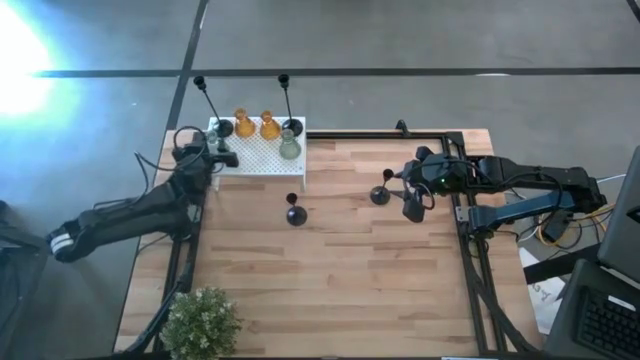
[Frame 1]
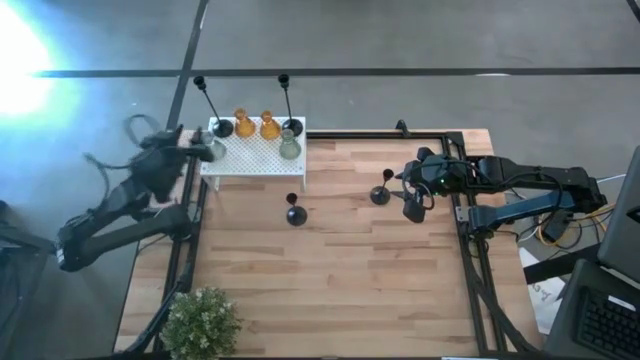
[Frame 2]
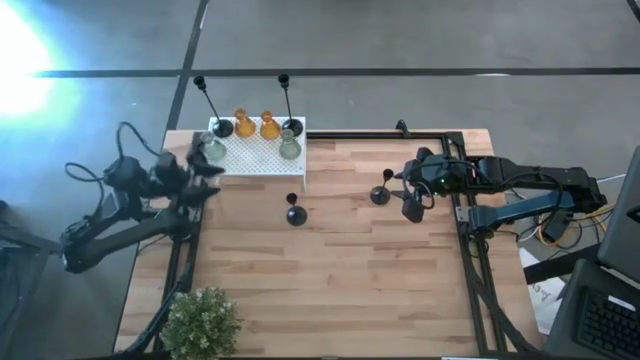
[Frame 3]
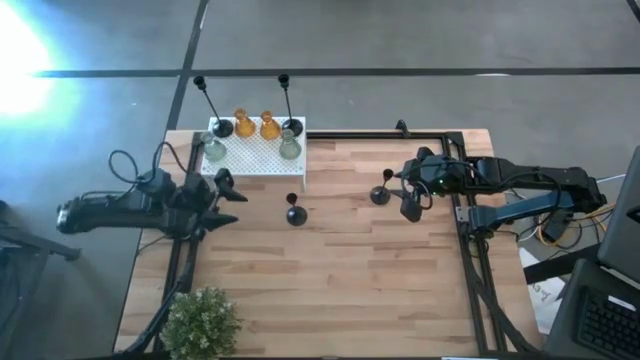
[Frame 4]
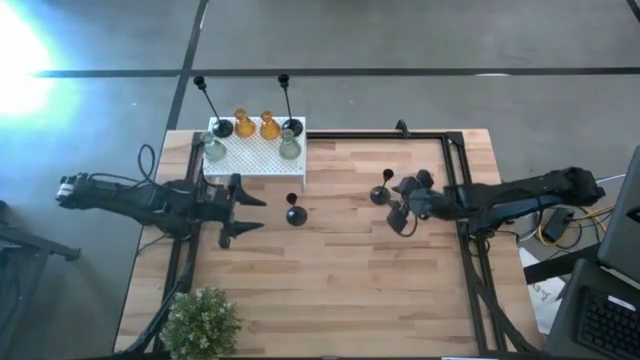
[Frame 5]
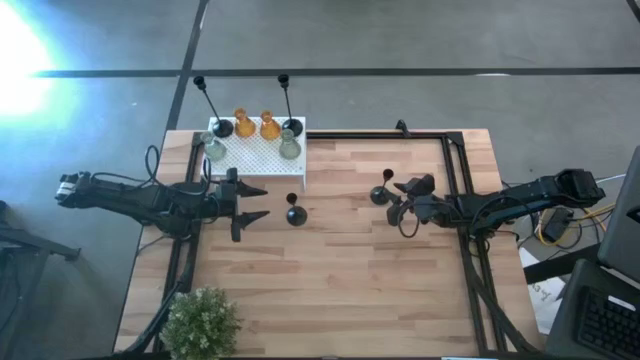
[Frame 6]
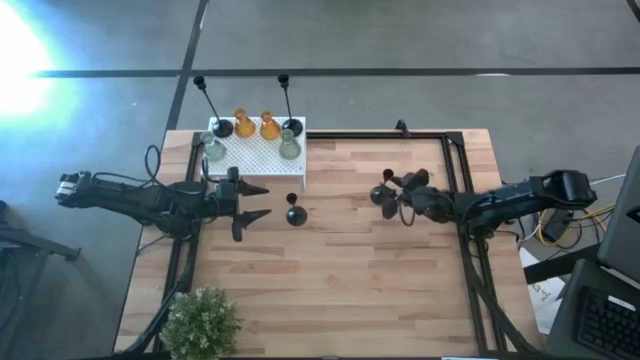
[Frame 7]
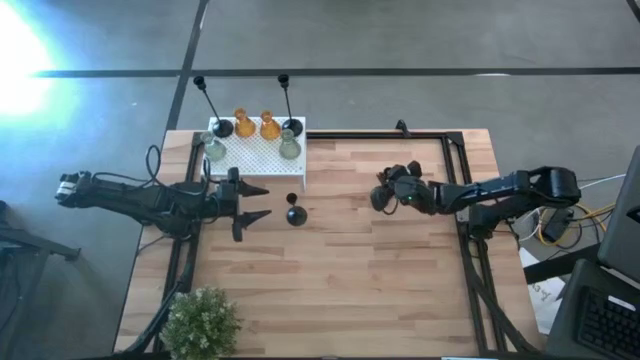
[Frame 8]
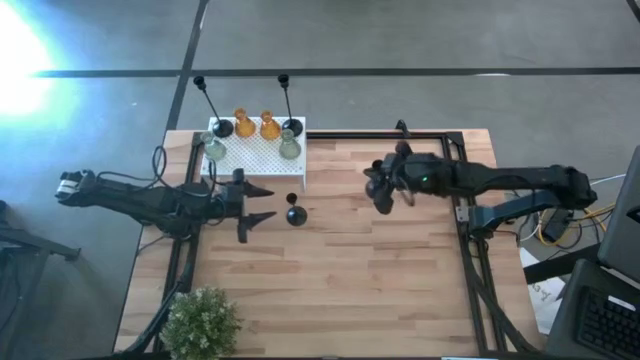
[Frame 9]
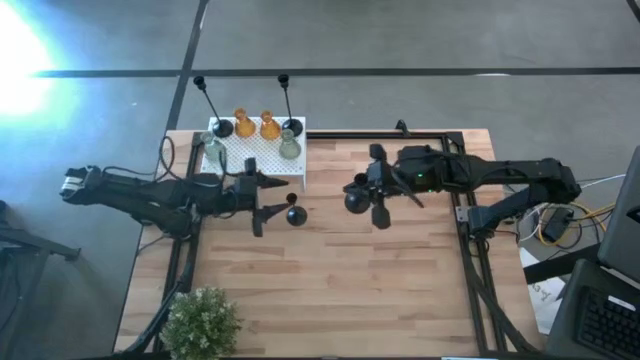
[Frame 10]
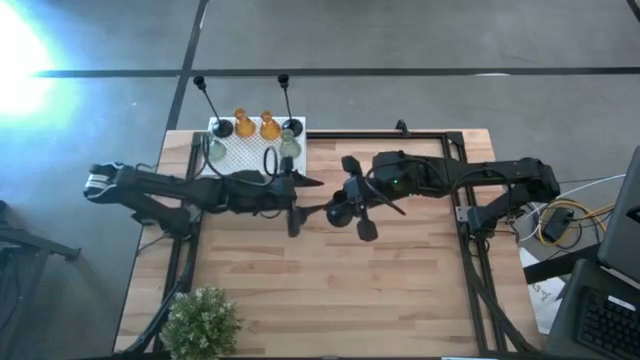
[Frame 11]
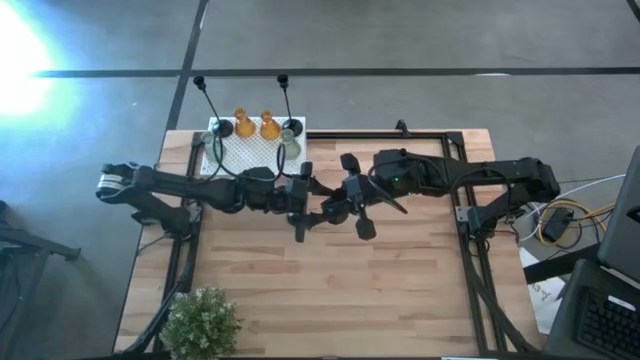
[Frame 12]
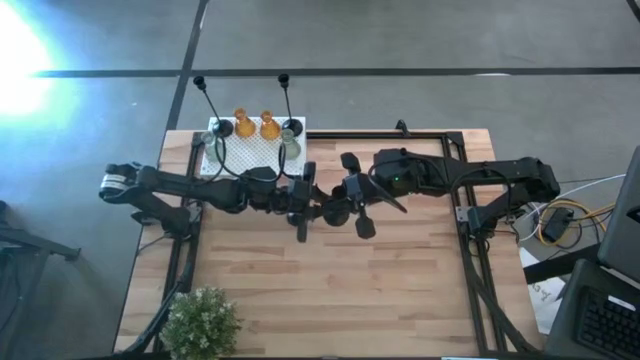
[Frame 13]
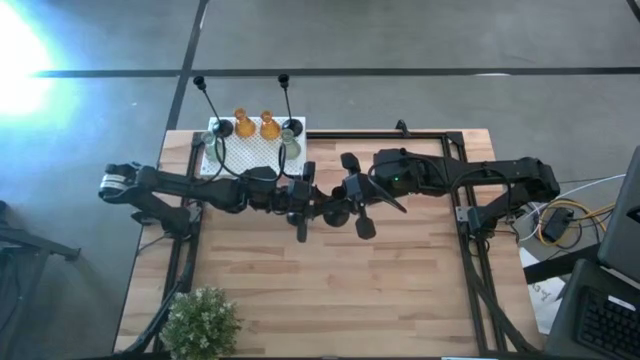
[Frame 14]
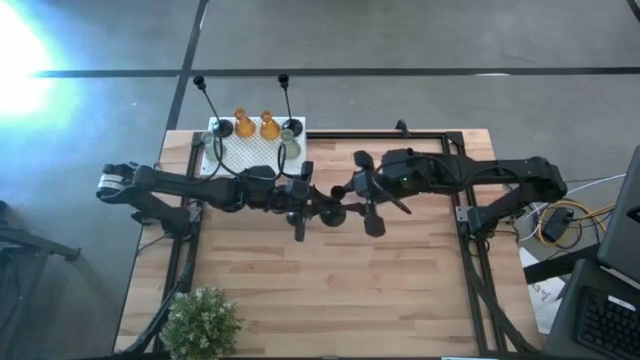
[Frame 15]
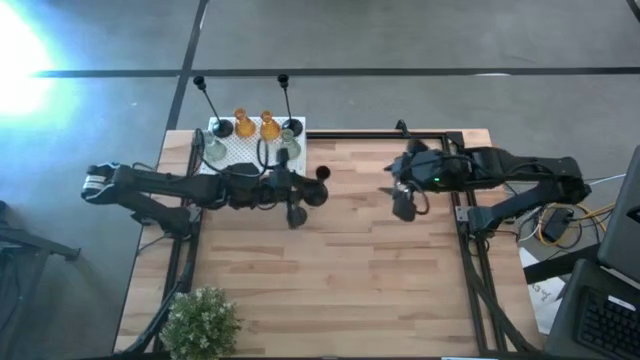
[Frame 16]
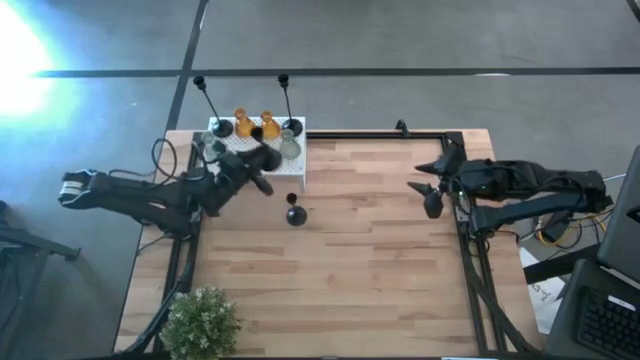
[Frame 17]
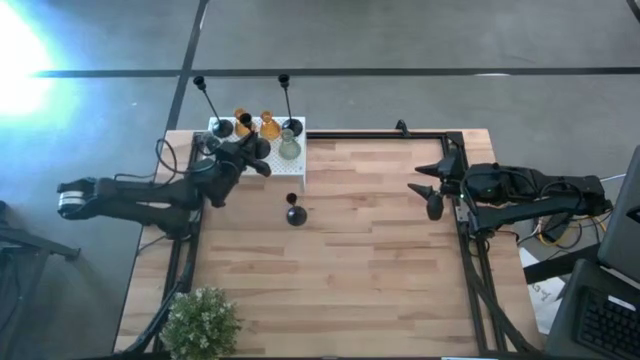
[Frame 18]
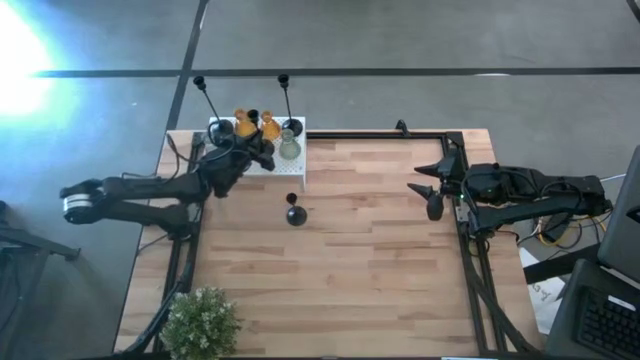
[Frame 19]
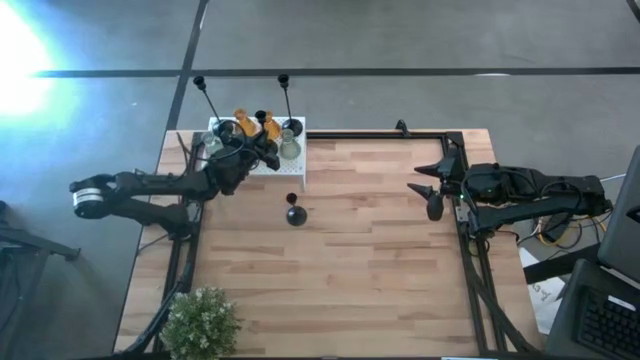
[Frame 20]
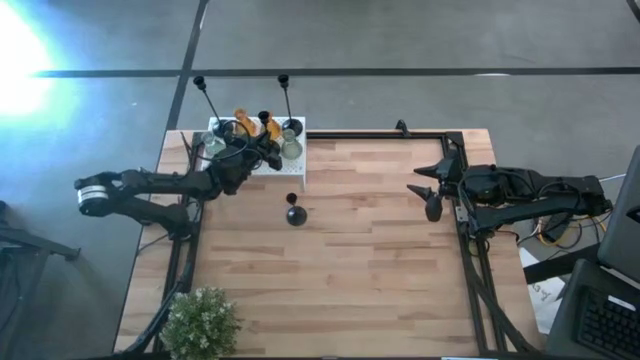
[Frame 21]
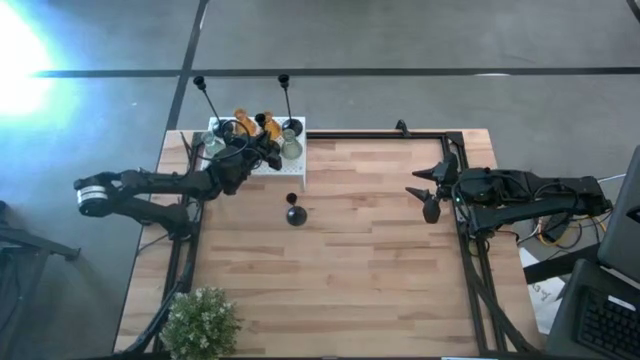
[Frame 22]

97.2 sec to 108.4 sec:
Task: Pick & Place candle stick holders
Put the right small black candle holder on the shelf

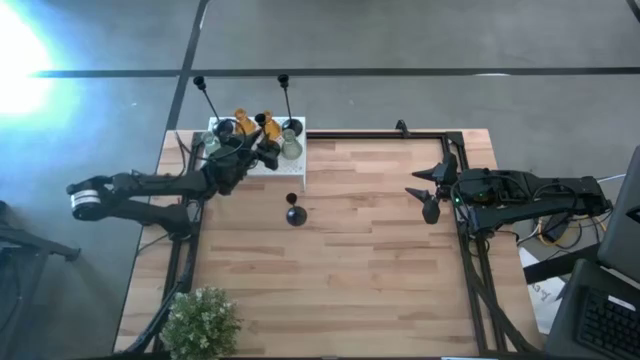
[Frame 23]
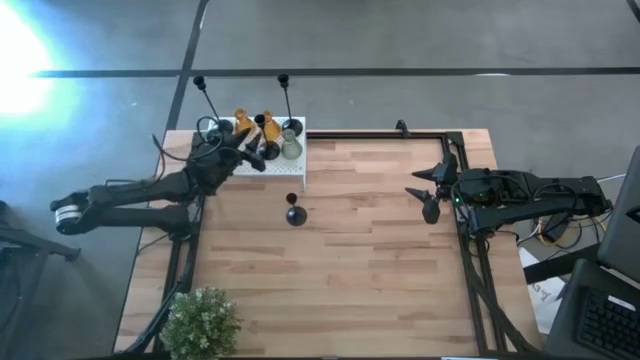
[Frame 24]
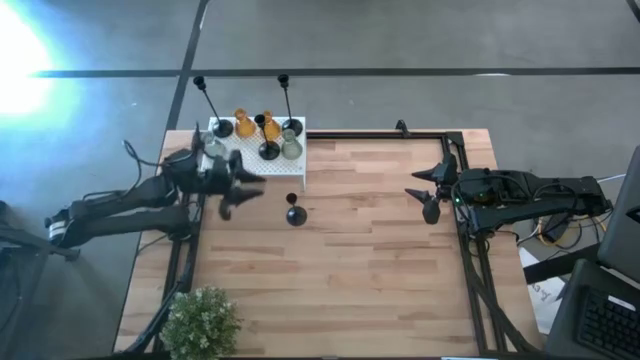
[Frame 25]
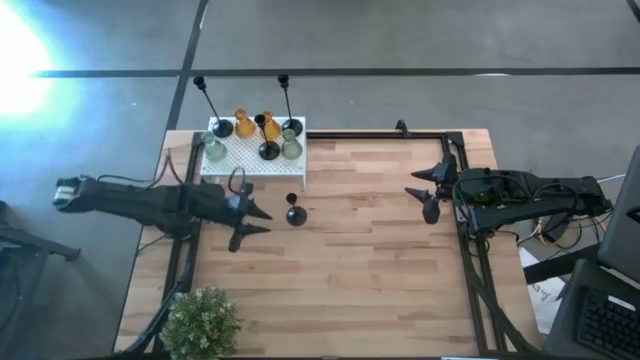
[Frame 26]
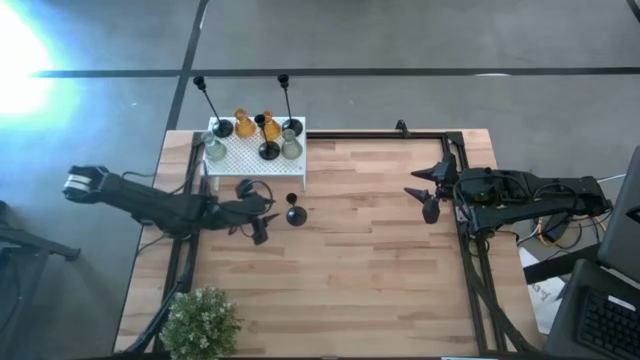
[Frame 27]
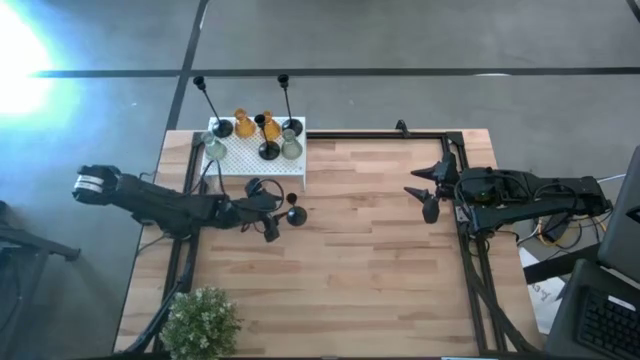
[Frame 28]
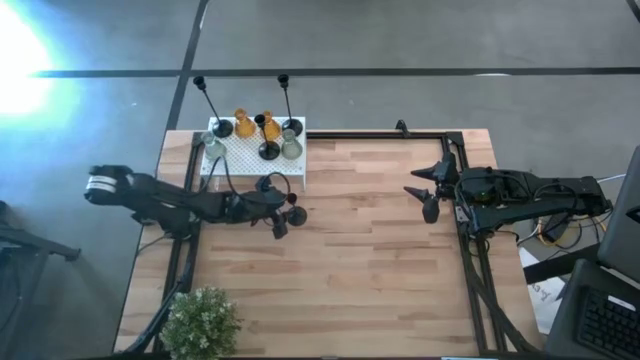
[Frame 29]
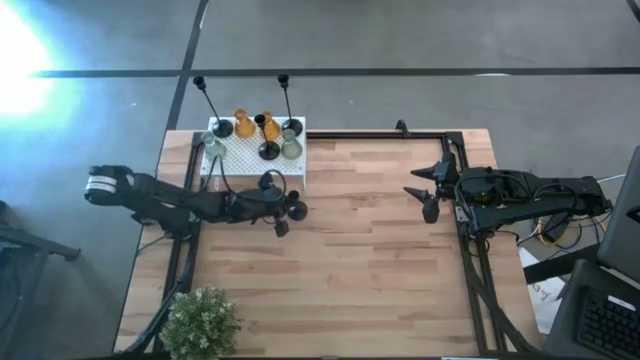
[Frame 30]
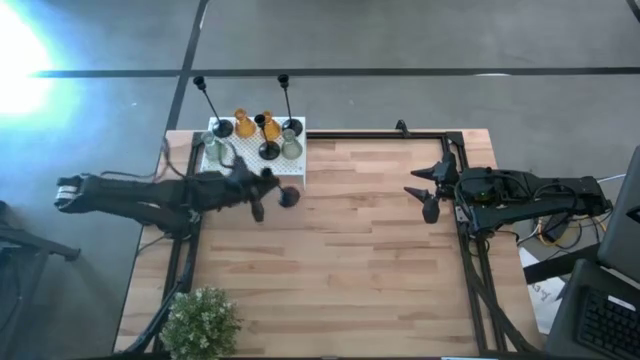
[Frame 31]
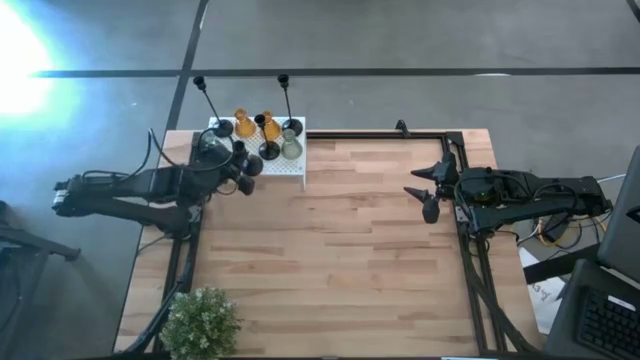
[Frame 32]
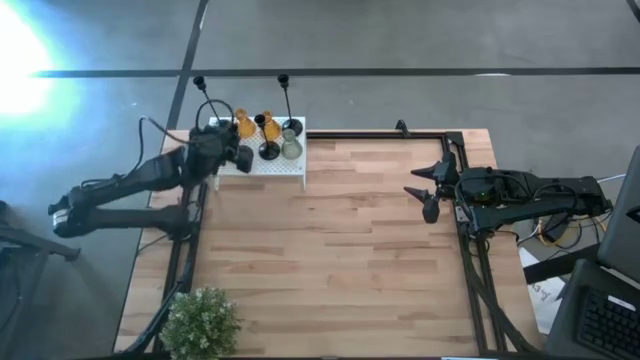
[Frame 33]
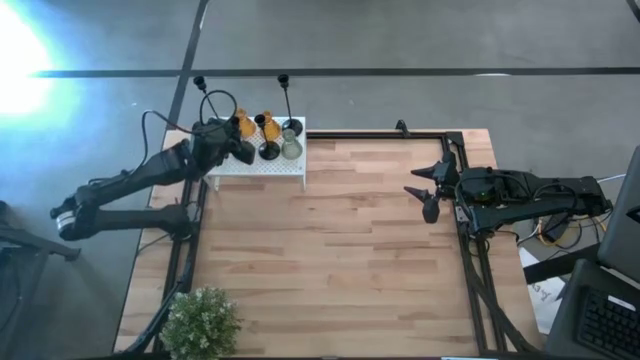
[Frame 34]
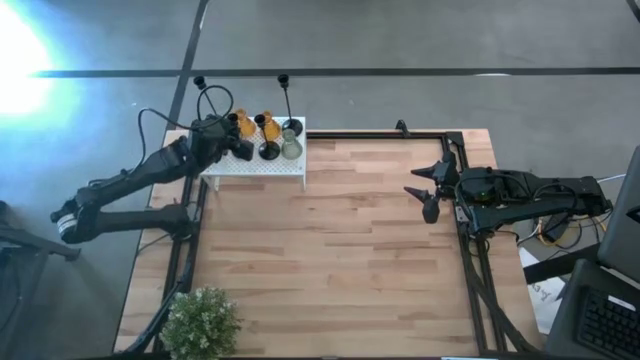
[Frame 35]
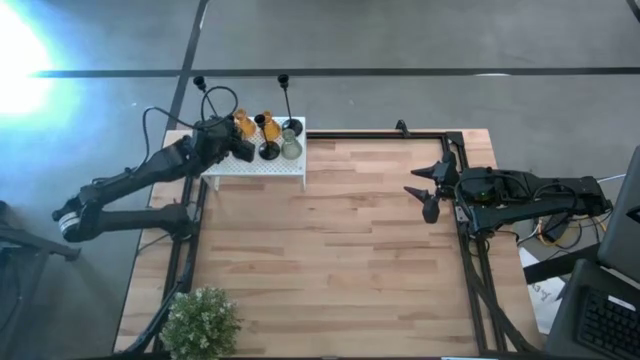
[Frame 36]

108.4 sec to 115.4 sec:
Put the small black candle holder on the shelf

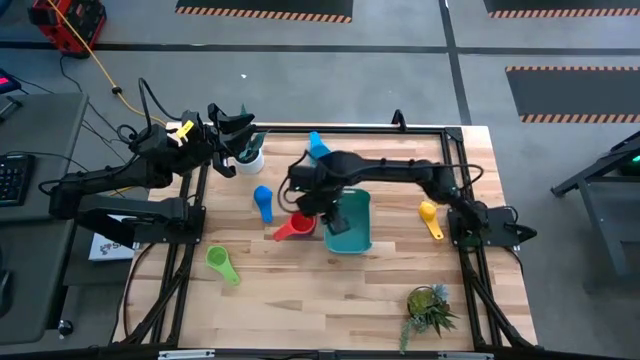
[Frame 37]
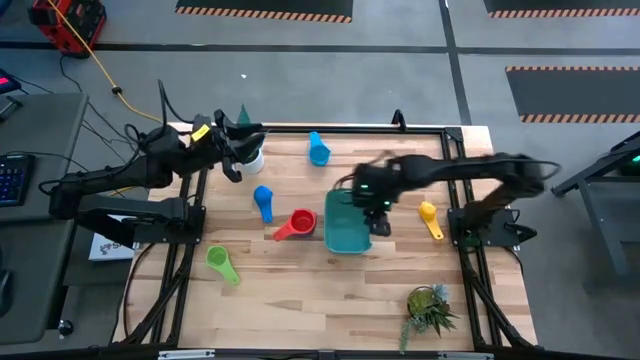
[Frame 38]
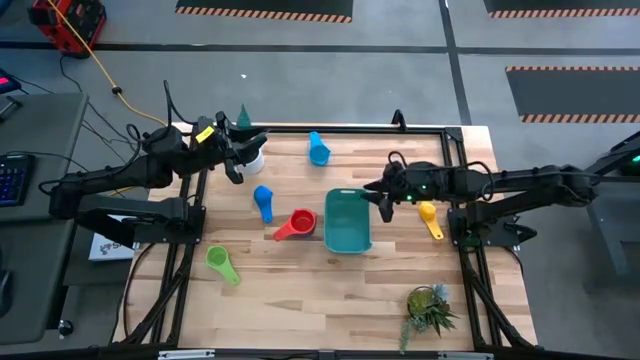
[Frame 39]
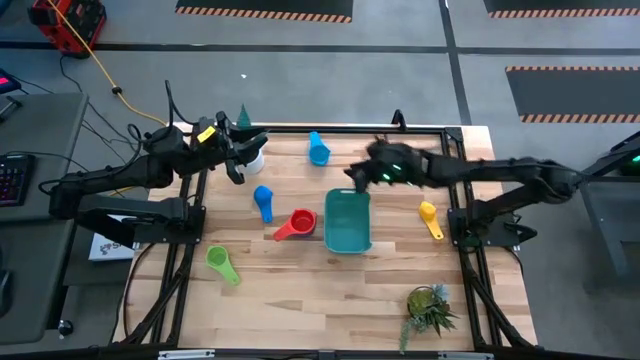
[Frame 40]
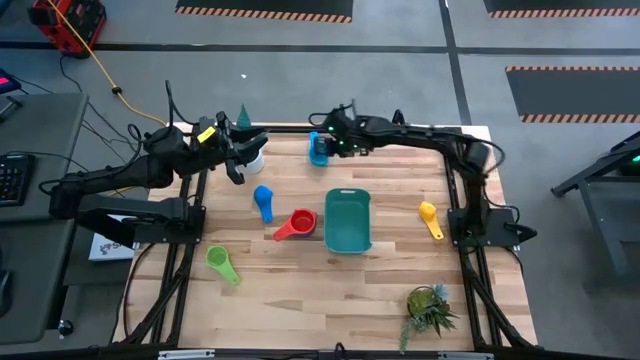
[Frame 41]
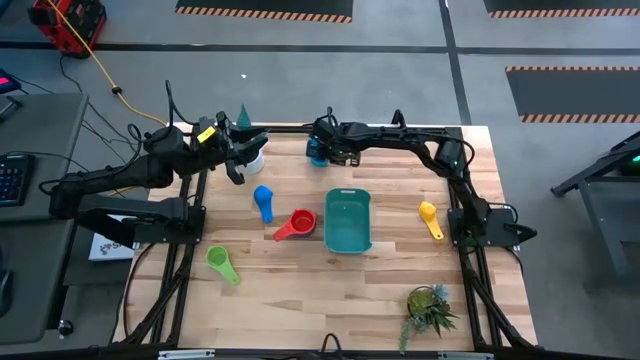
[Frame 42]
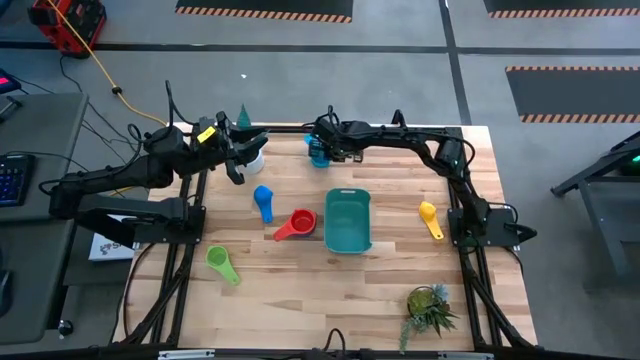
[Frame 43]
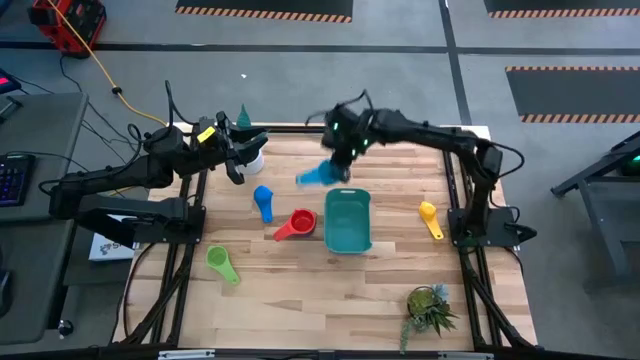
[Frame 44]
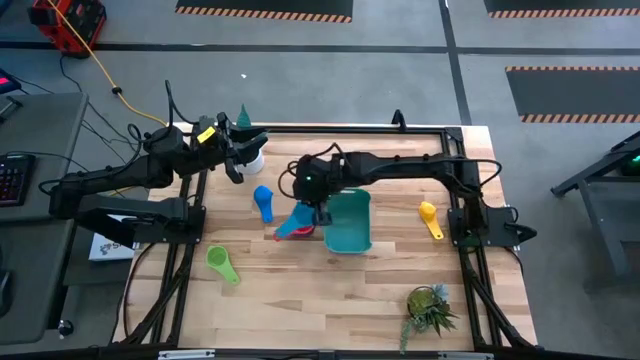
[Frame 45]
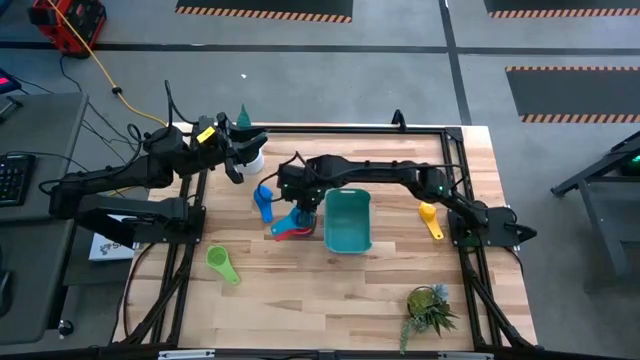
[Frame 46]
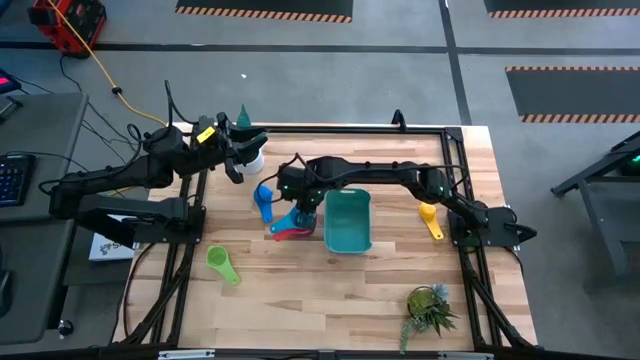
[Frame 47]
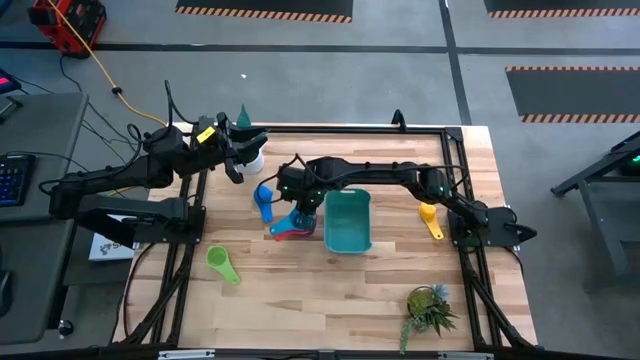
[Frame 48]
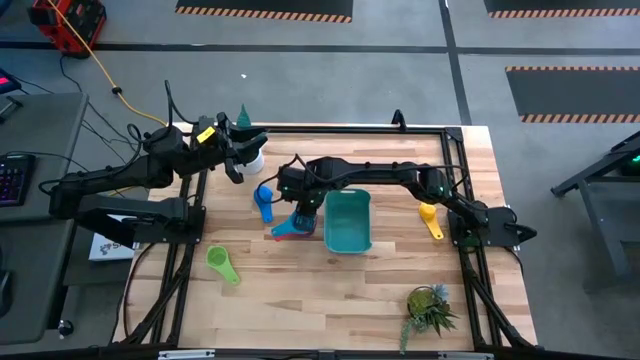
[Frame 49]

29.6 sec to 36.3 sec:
Task: Nest measuring cups in basket
Stack the light blue measuring cup on top of the red measuring cup
